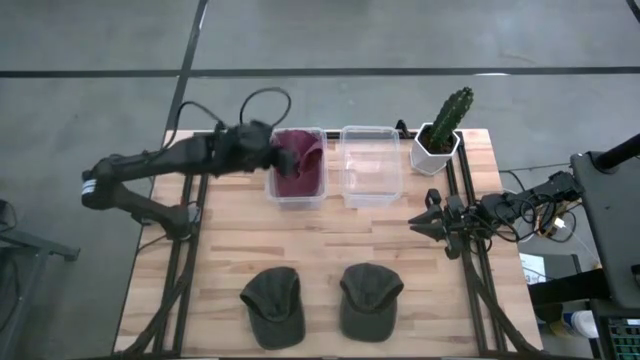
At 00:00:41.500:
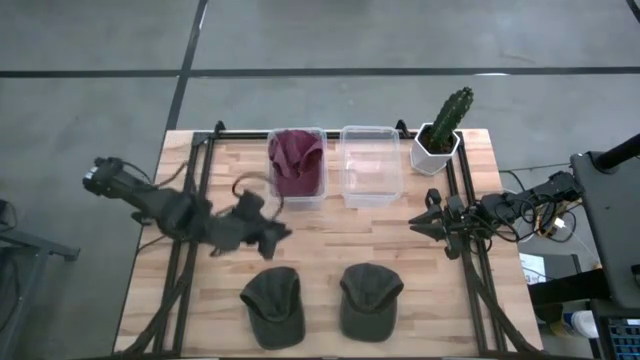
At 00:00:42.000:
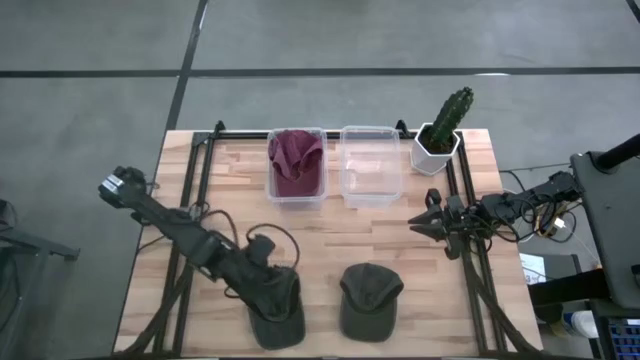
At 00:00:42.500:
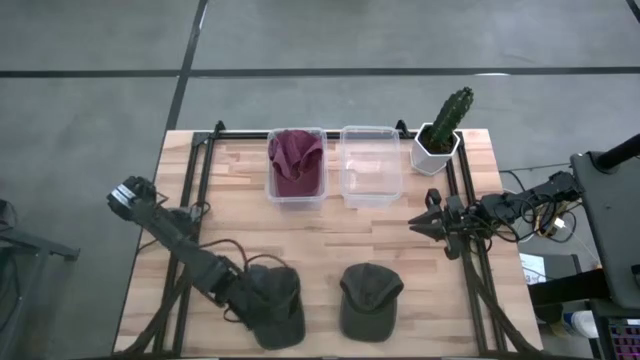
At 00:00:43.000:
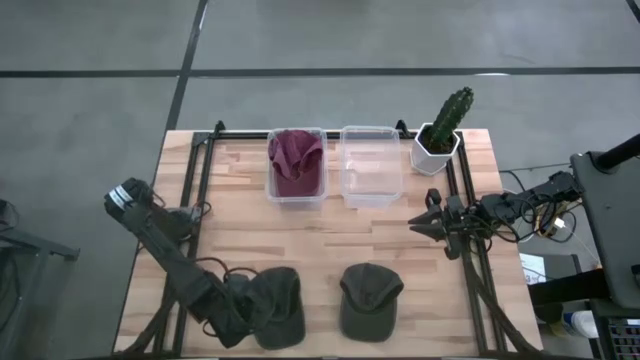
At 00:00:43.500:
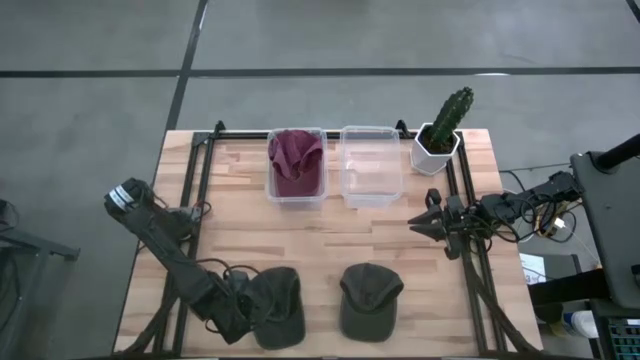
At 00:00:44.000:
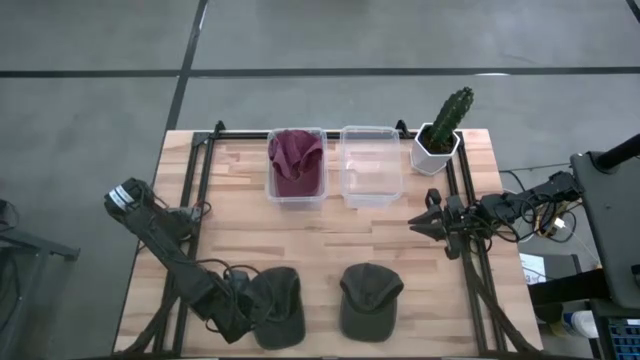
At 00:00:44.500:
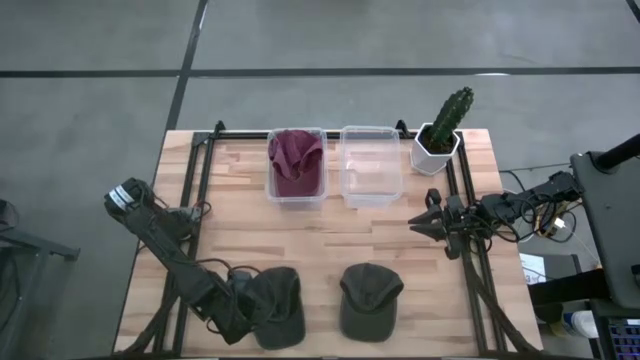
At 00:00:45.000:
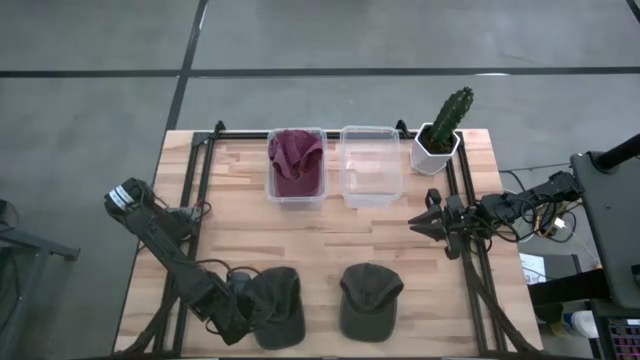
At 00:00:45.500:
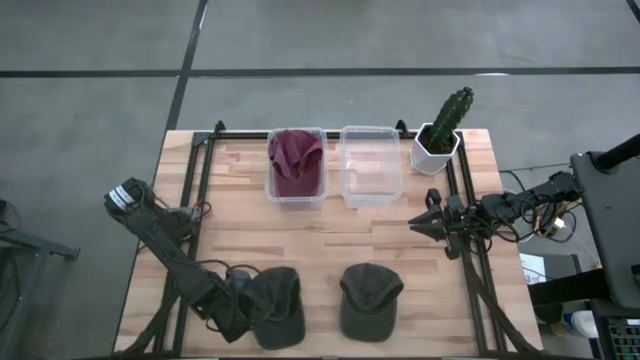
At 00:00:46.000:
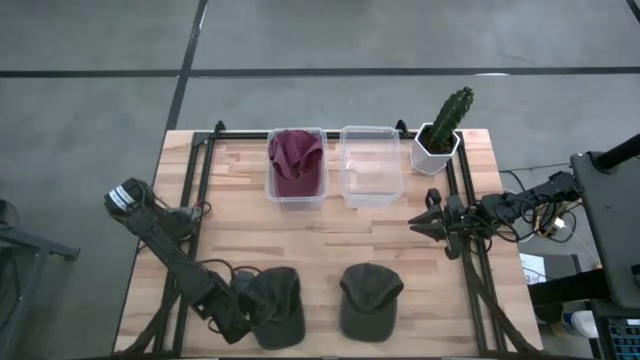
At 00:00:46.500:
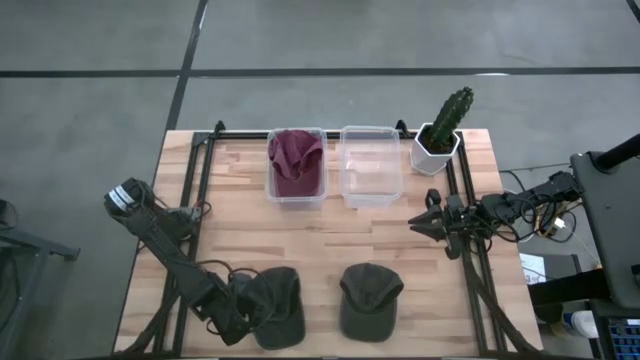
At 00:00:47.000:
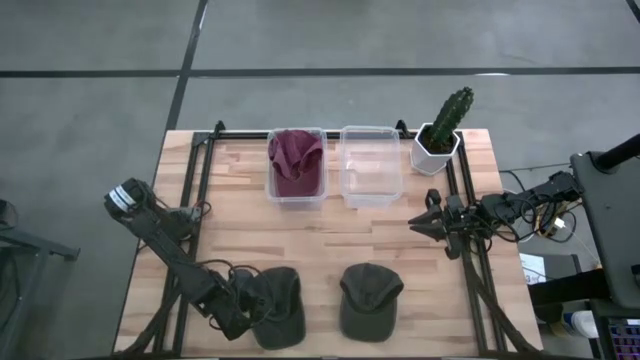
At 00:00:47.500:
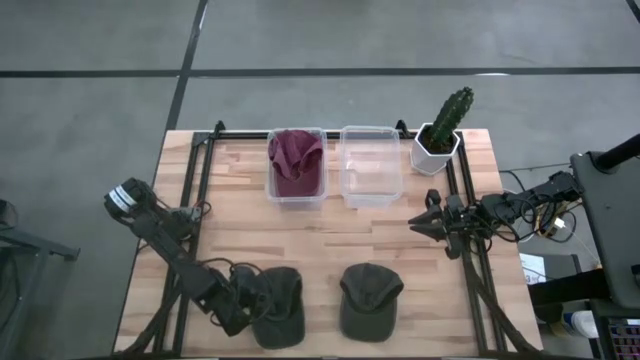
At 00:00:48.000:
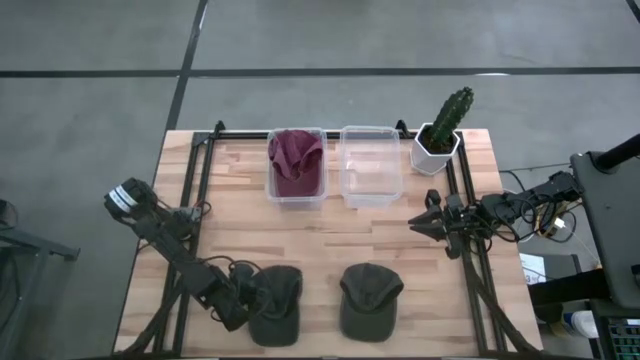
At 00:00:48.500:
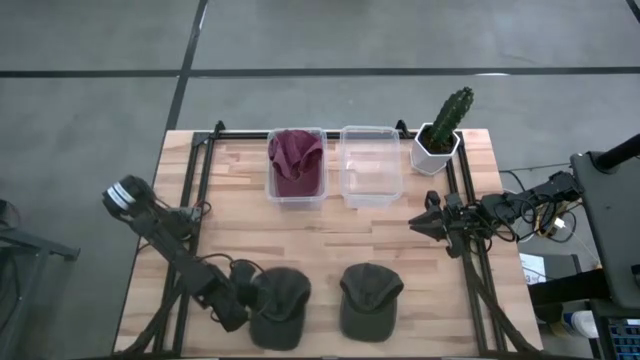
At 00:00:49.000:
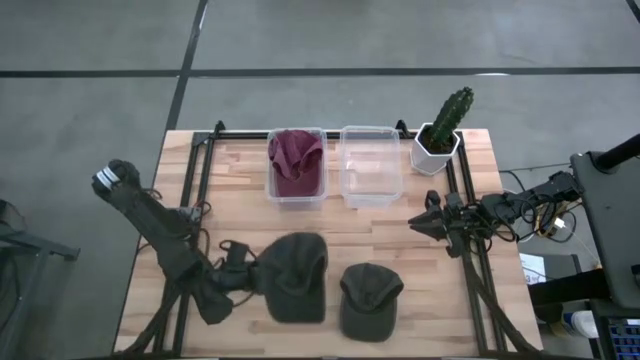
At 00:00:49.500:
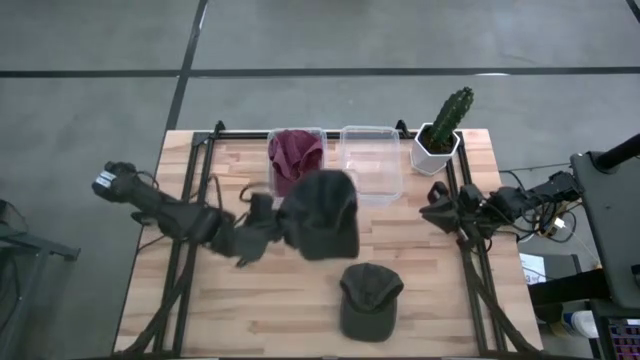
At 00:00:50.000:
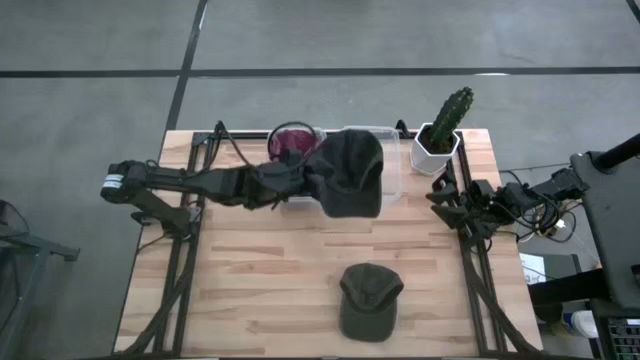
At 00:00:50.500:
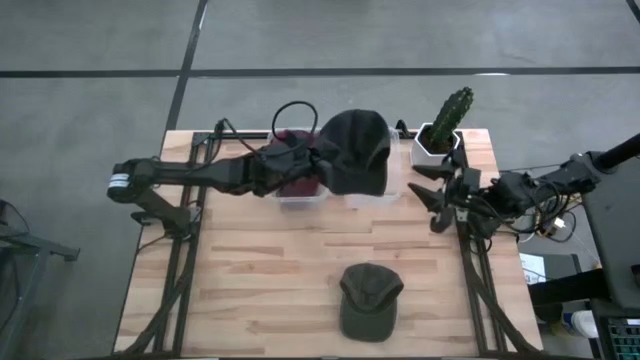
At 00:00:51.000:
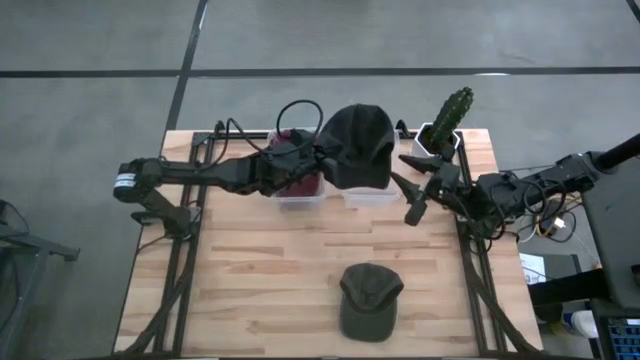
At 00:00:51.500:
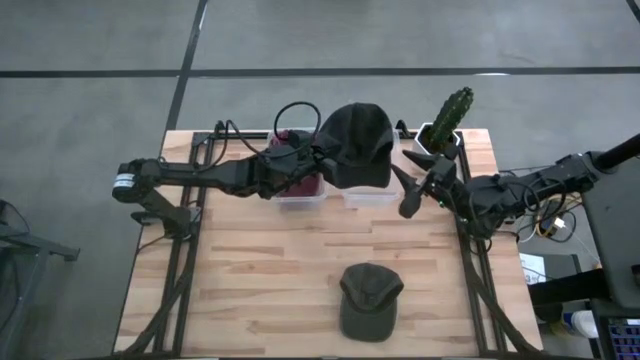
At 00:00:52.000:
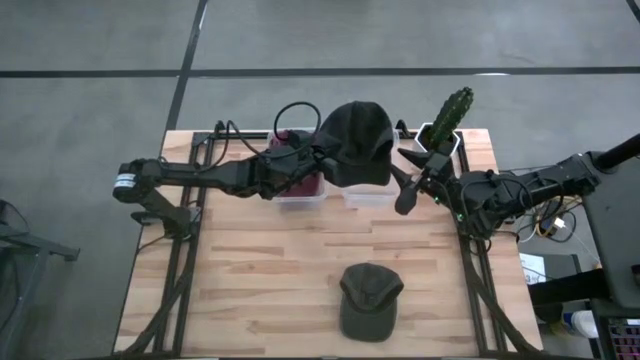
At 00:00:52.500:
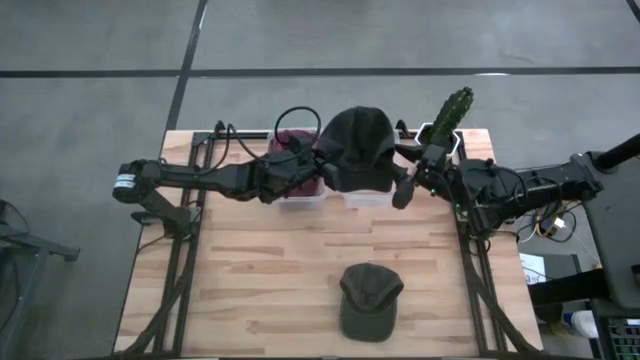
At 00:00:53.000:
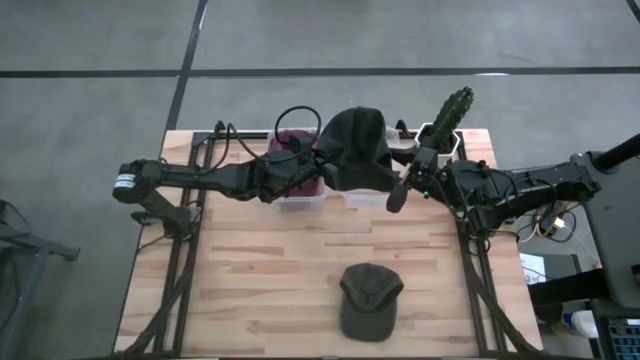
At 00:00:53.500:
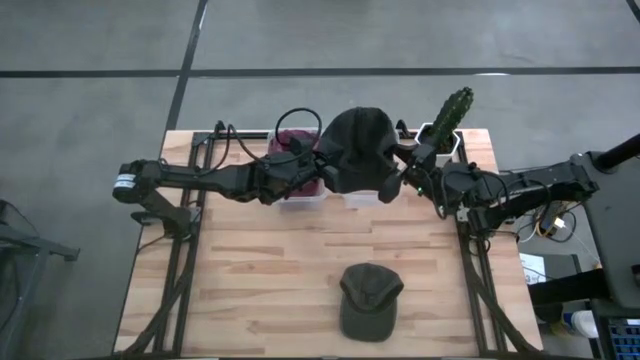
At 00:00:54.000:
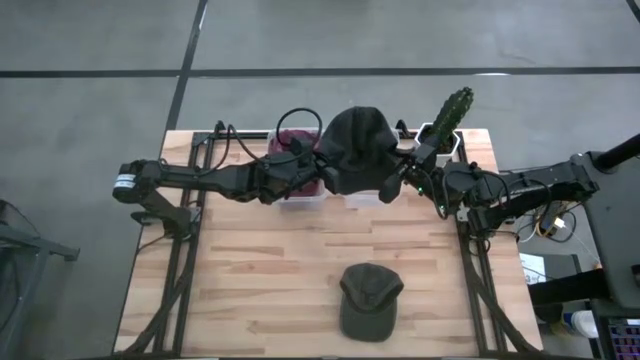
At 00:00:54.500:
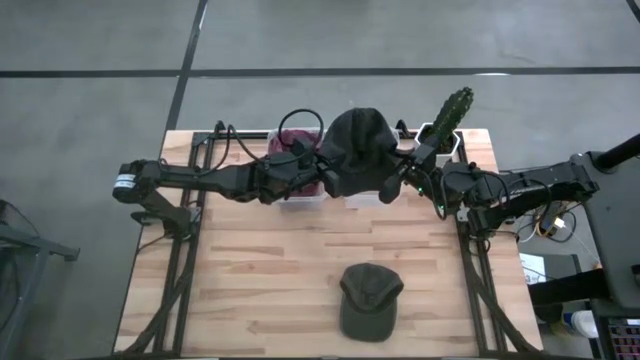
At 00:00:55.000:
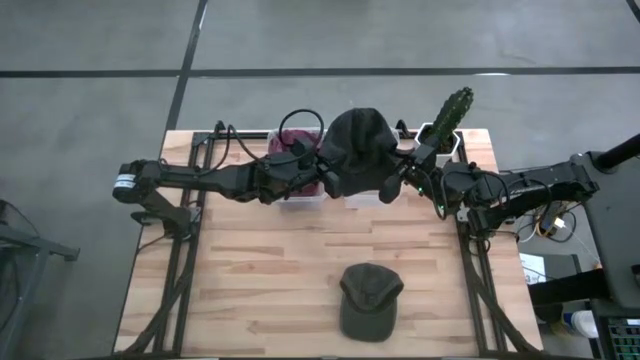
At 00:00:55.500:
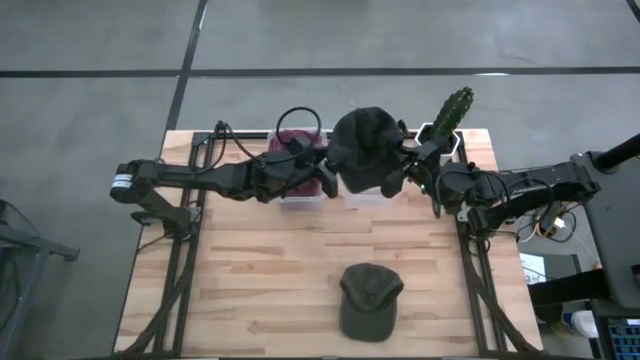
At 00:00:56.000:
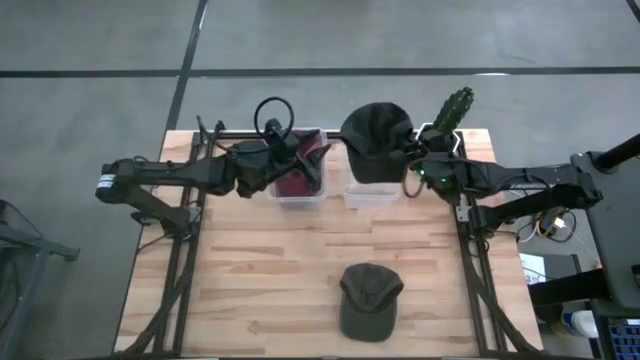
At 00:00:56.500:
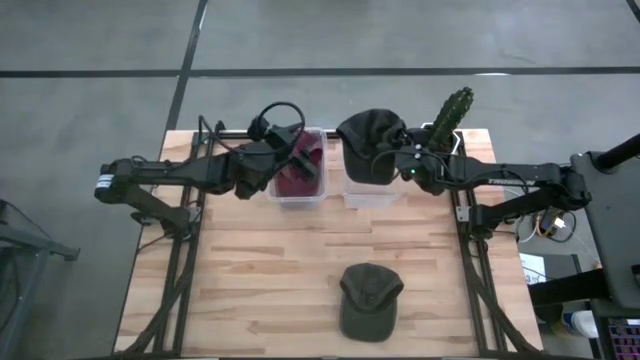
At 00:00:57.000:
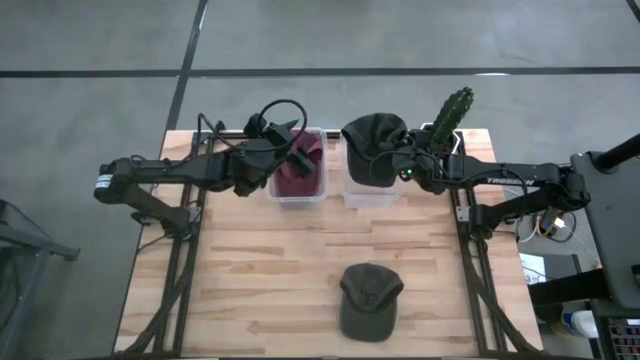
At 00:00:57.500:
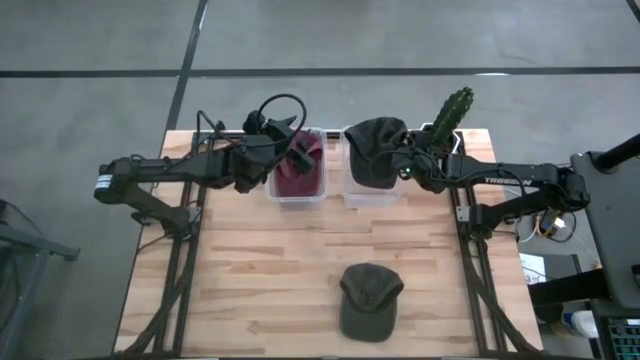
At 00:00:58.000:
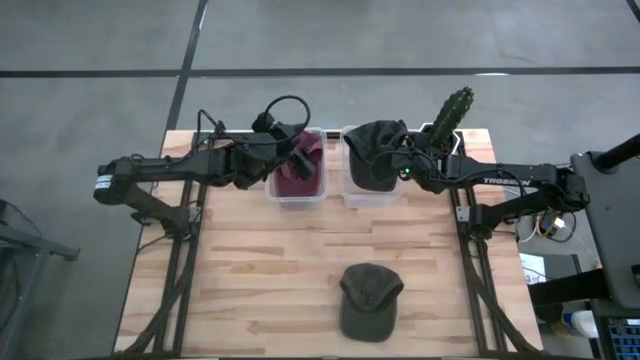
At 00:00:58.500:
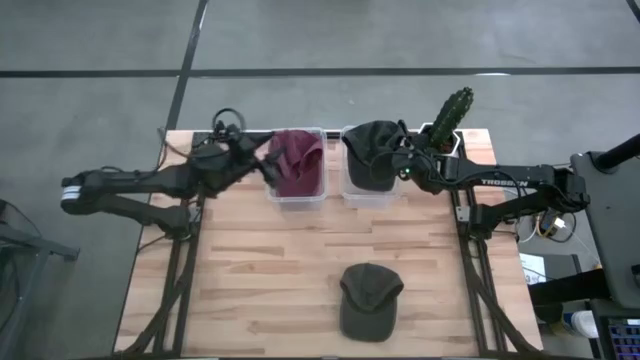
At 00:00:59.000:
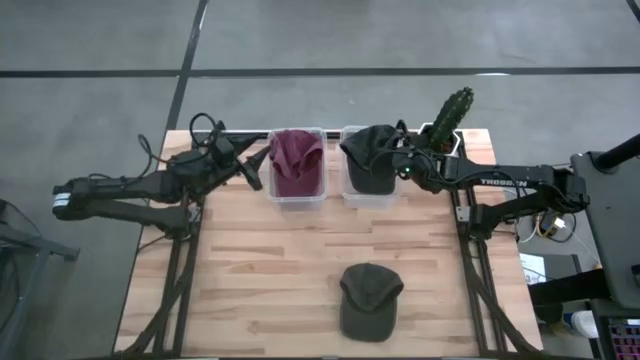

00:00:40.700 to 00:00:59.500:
Task: Pick & Place hat
Put the left black cap into the right transparent bin

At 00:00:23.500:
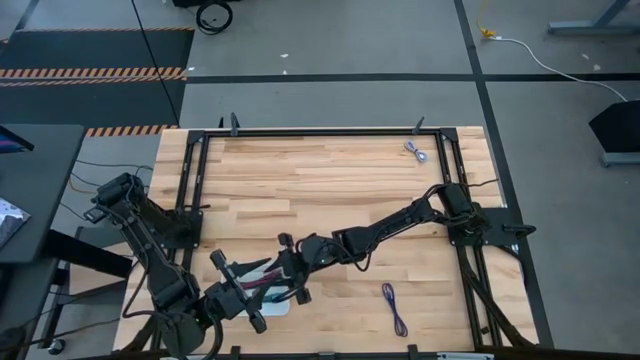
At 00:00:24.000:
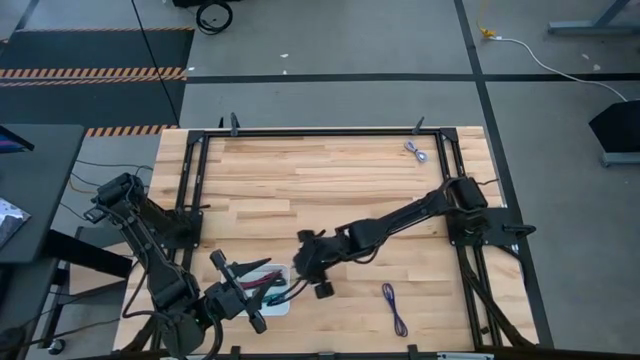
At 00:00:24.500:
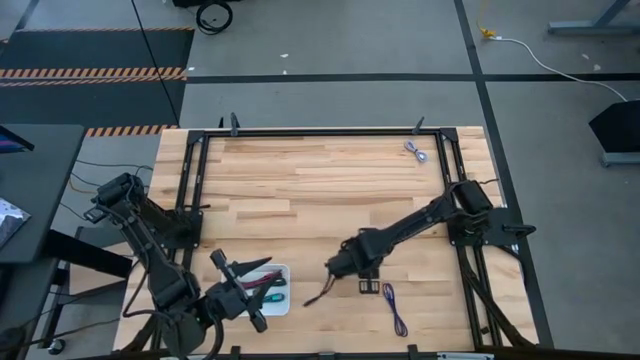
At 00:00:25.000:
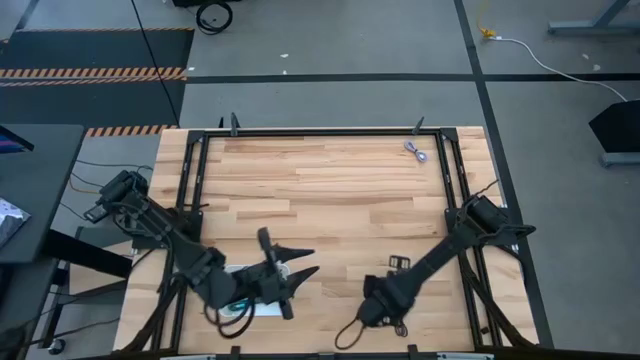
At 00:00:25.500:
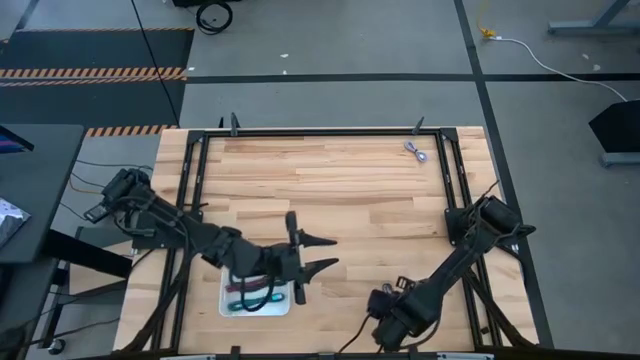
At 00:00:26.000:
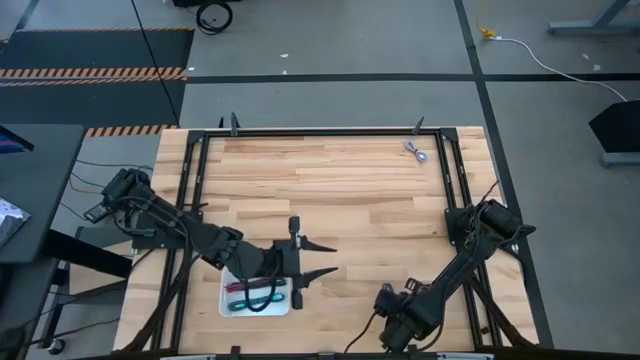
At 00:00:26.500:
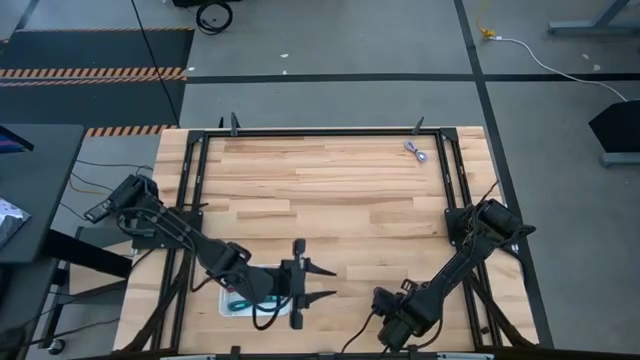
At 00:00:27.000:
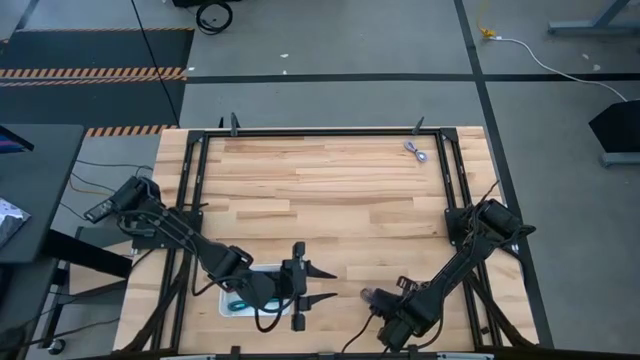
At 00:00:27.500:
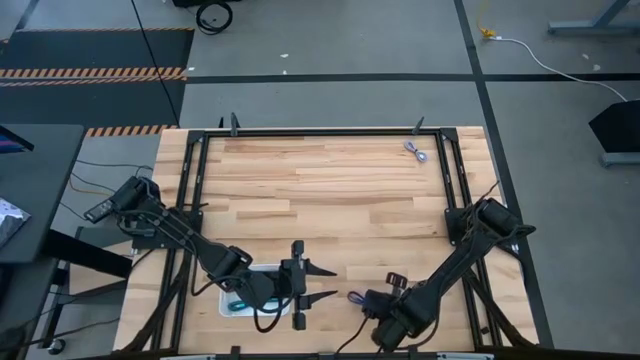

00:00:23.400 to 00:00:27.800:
Task: Pick and place USB-C Cables
Put the blue charger cable into the white bin
